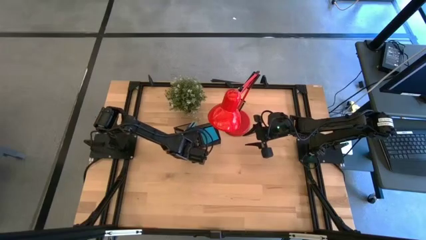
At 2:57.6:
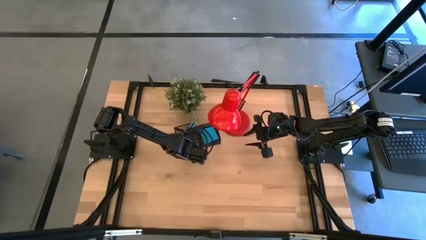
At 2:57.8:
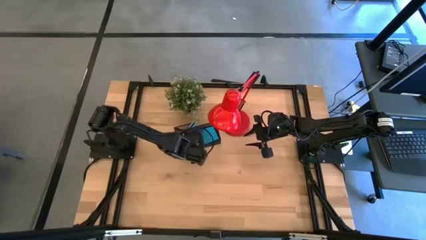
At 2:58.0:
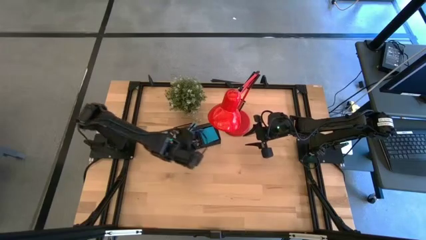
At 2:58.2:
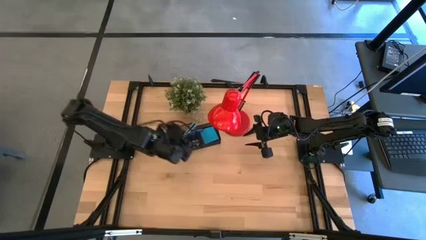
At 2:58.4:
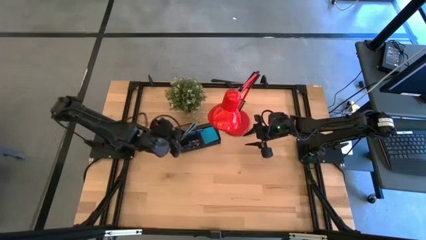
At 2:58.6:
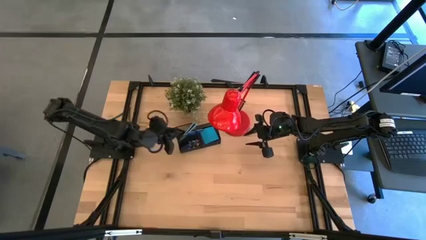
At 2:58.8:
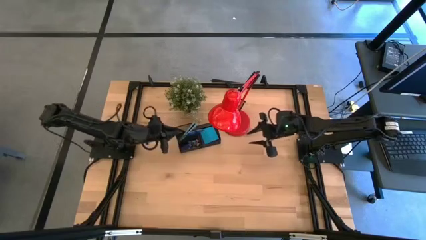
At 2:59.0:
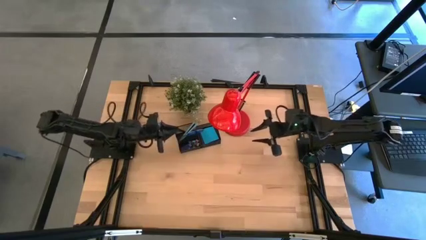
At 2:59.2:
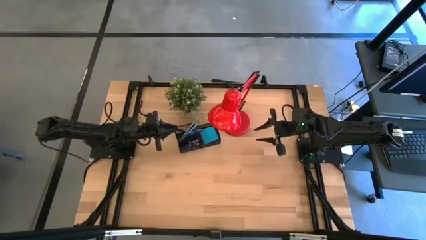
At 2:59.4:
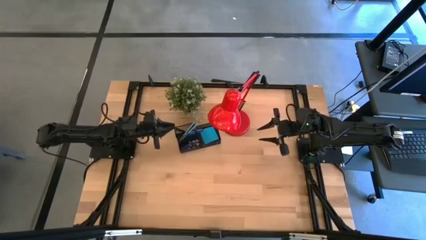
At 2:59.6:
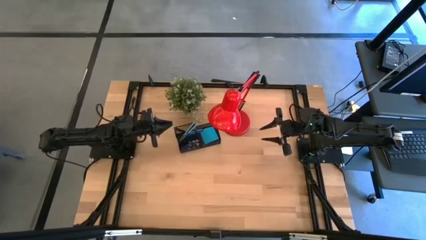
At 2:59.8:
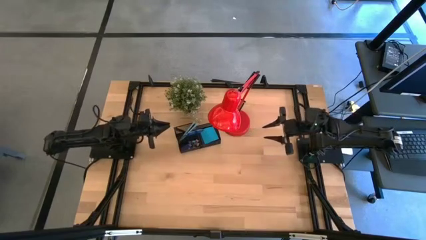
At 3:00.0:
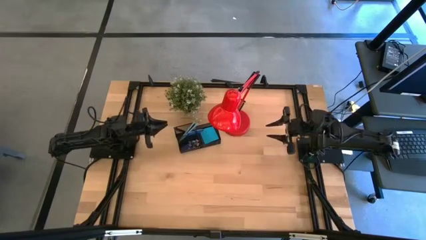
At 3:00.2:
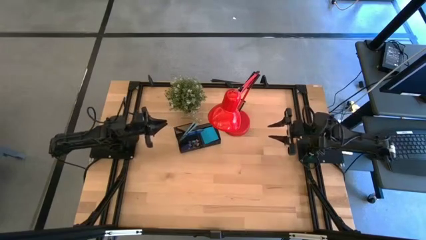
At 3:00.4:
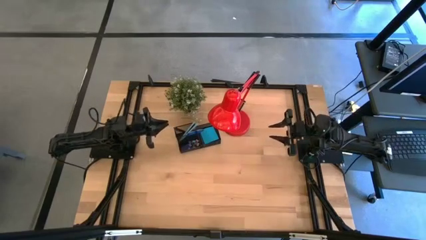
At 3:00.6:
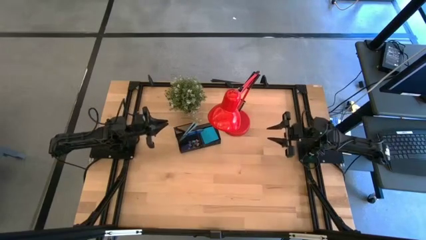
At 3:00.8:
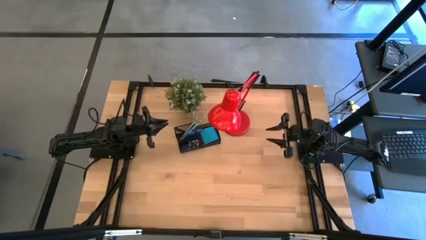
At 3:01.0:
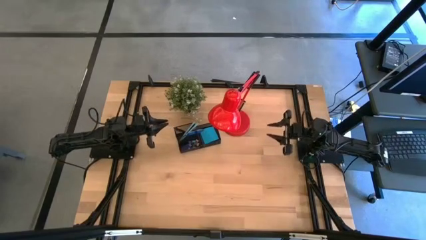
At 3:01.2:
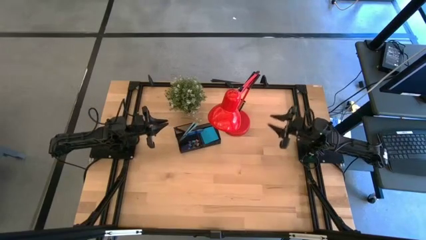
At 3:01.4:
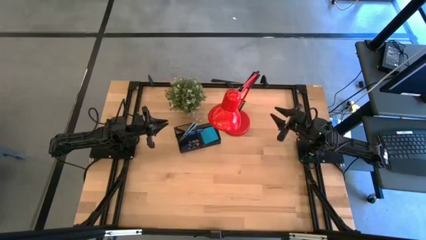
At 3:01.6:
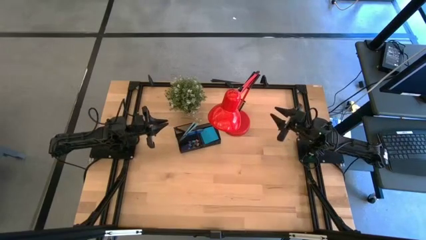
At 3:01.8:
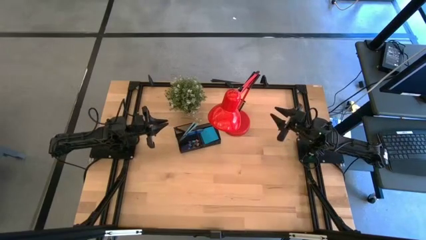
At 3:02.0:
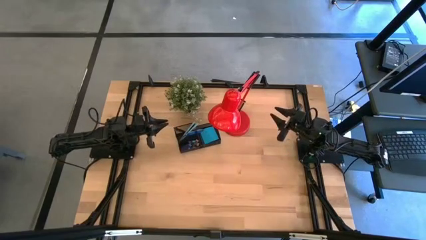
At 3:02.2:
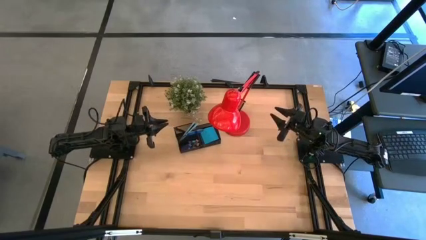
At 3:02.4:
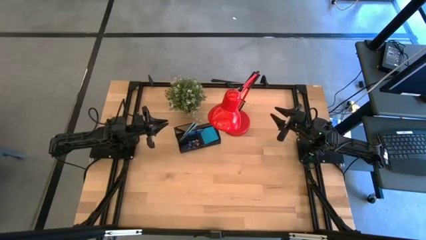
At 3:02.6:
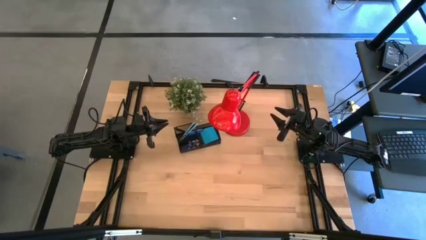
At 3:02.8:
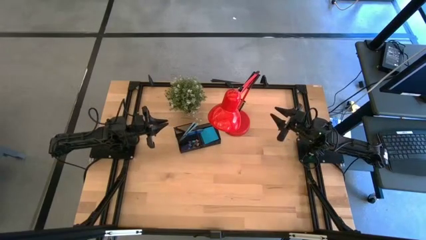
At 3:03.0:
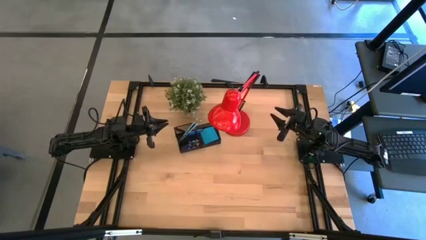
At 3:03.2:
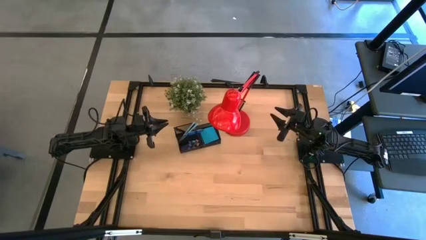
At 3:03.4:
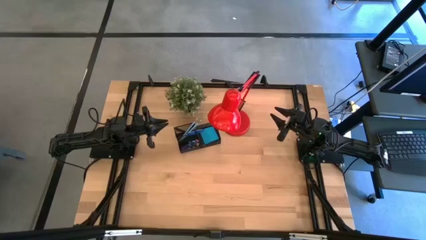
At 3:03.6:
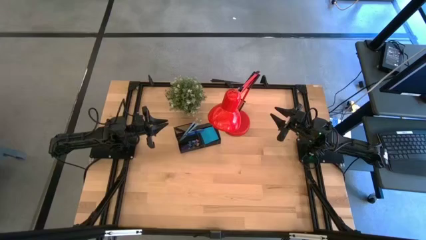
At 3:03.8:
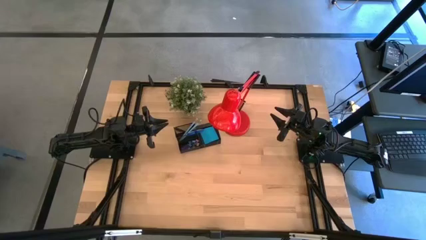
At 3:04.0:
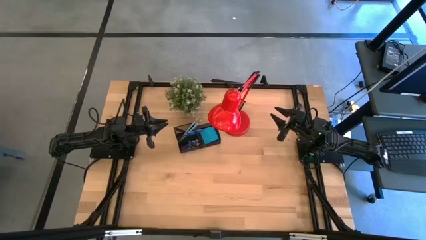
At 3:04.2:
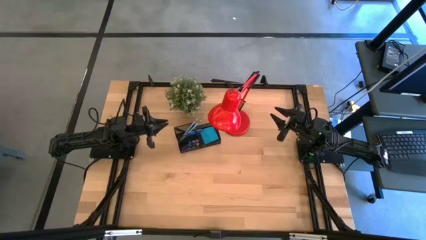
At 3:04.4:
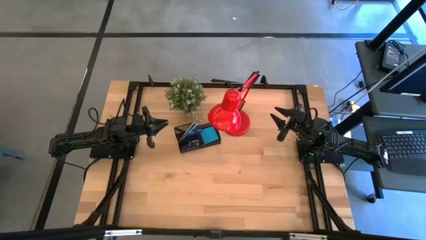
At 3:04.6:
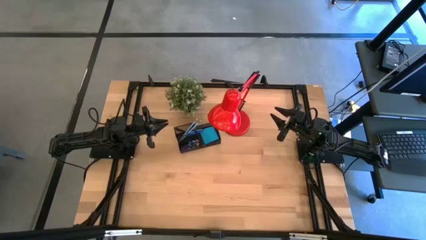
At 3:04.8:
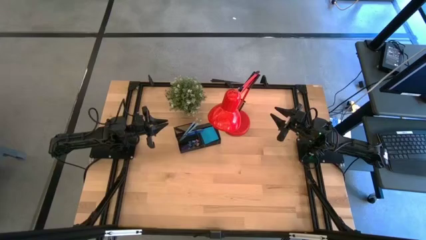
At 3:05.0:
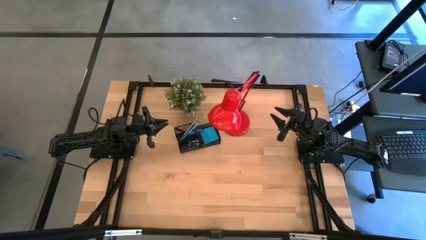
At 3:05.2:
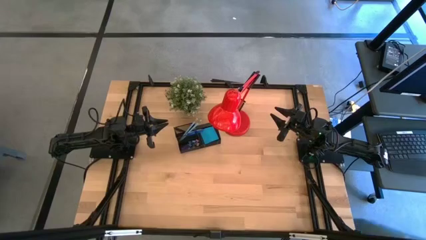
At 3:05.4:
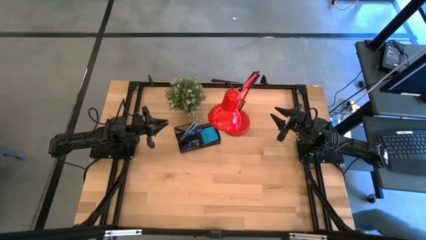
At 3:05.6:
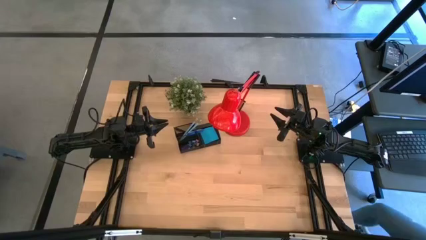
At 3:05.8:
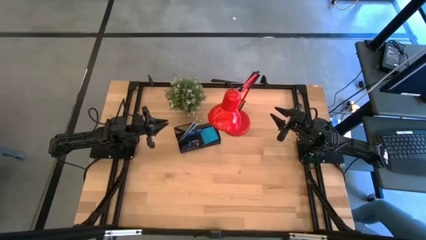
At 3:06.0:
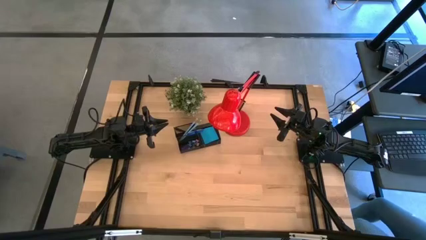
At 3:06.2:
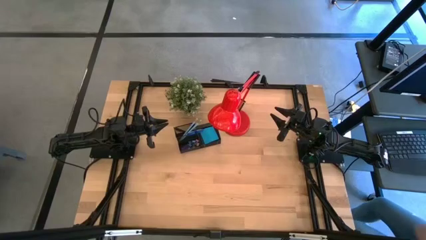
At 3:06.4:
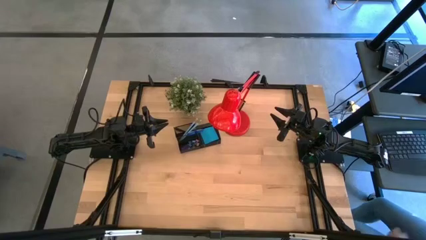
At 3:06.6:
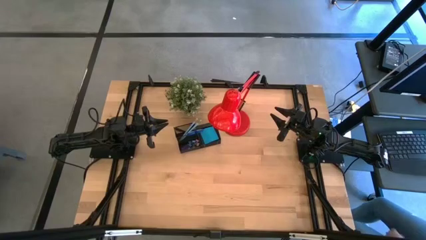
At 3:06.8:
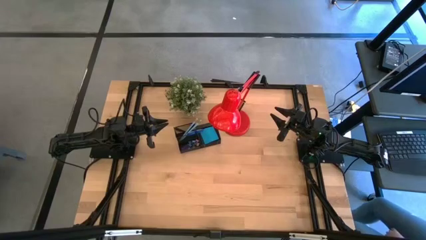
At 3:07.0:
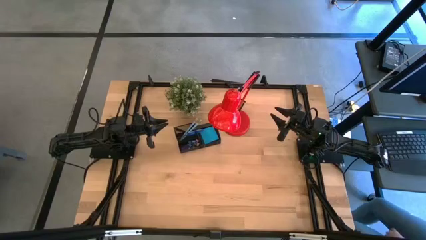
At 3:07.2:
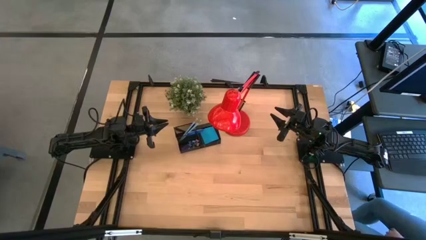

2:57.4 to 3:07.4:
Task: Pick and place office supplies into organizer
Return to Home Position

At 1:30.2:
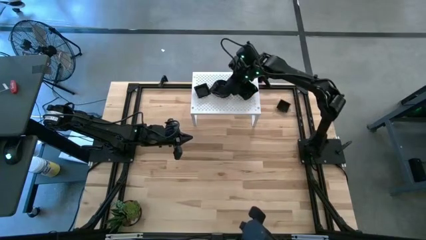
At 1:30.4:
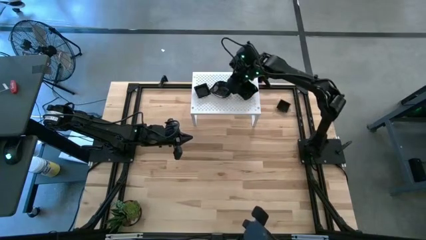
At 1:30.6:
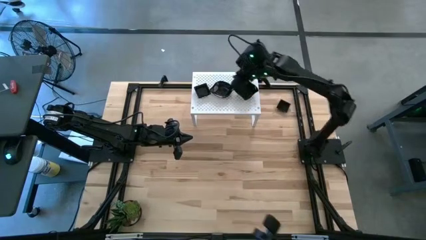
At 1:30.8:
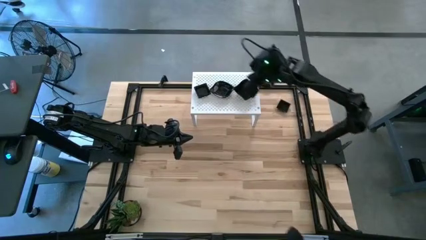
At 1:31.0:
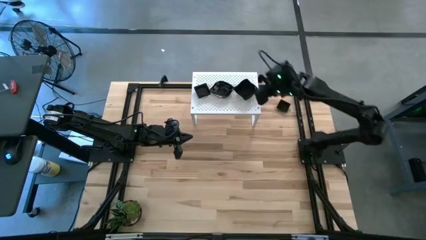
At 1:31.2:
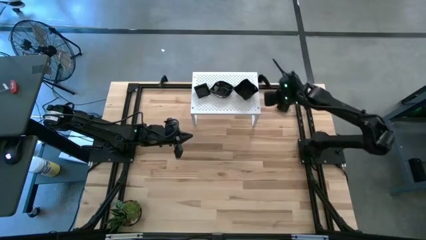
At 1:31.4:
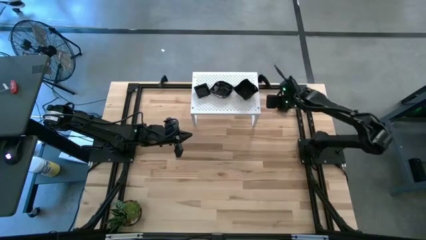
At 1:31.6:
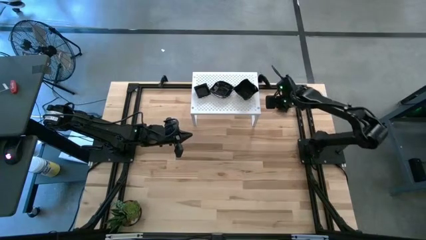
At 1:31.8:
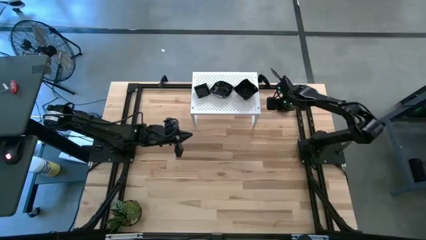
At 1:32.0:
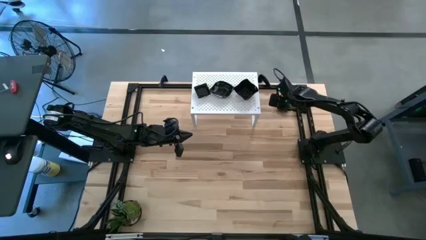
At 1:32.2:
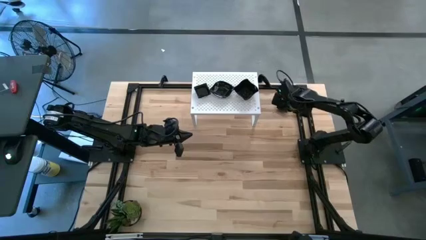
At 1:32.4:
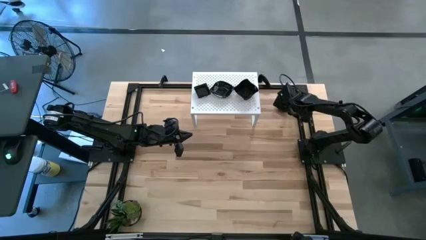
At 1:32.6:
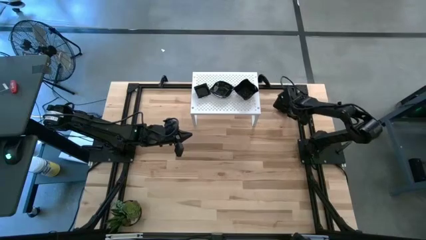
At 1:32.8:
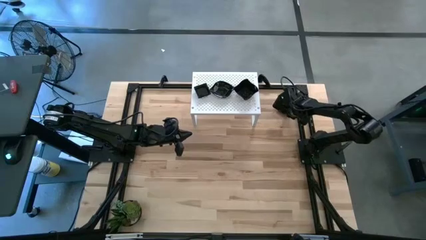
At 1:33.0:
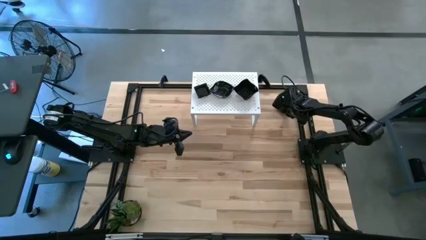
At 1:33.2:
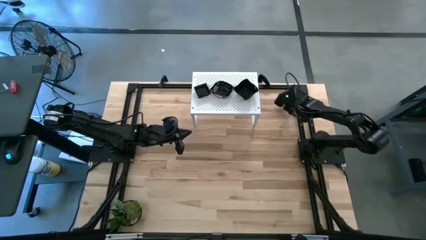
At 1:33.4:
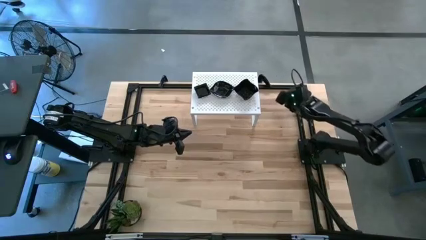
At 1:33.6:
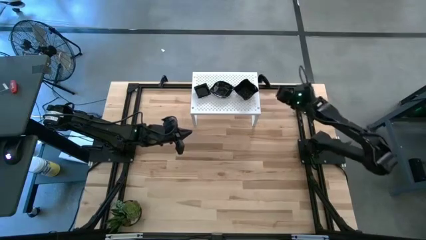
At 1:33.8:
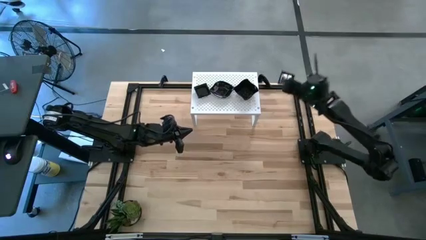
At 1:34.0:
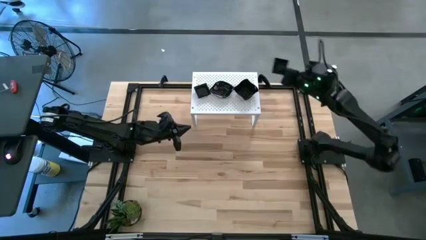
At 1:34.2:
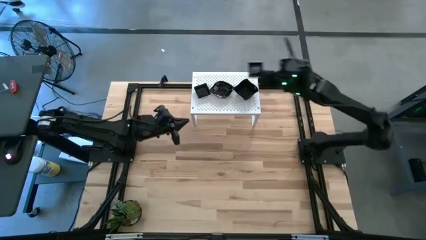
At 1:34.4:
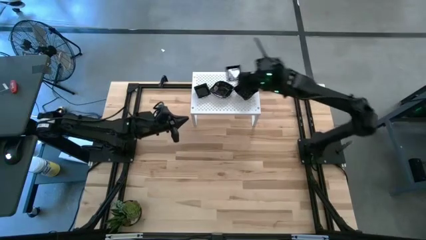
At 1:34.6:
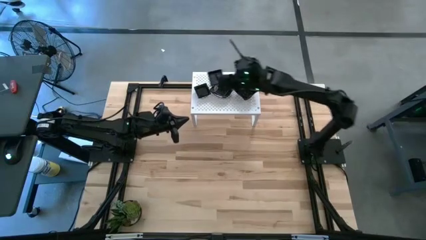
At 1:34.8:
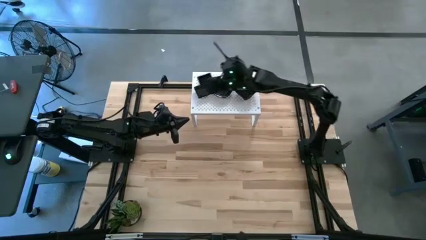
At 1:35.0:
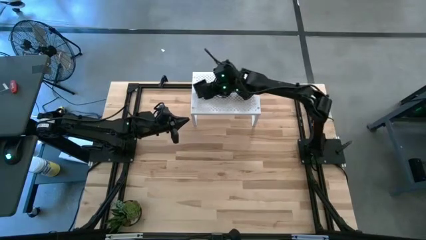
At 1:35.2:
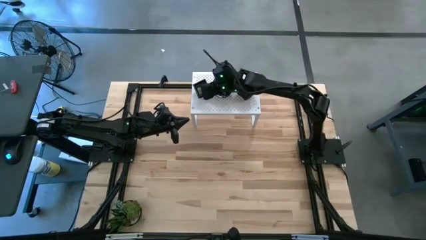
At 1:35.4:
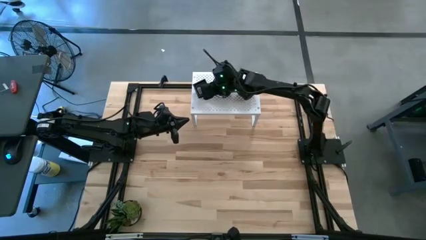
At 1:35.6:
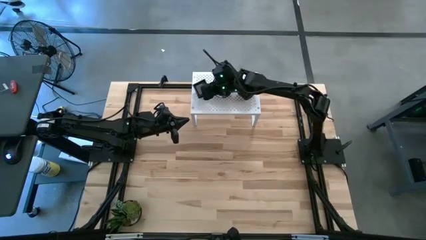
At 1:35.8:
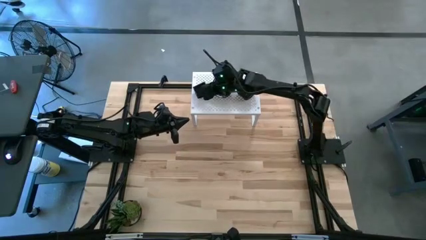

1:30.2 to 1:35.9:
Task: Pick & Place Mini shaped plates
Stack the black square plate on top of the black square plates on the shelf
